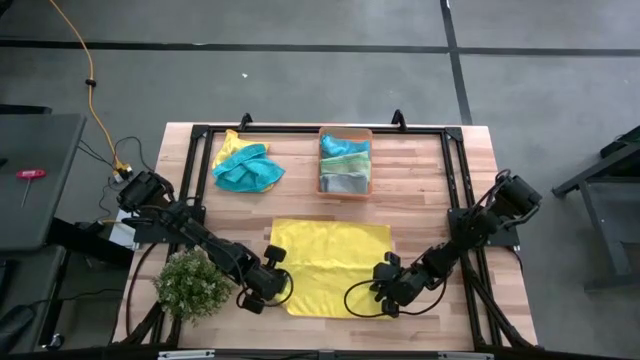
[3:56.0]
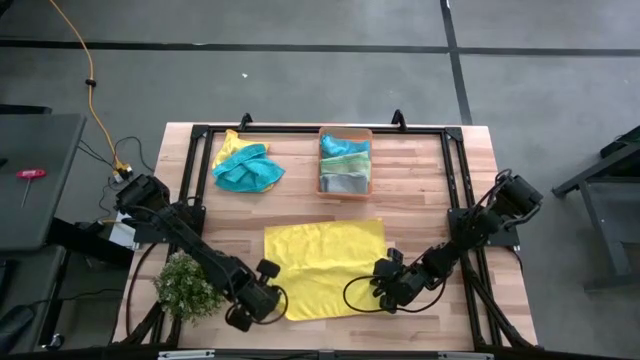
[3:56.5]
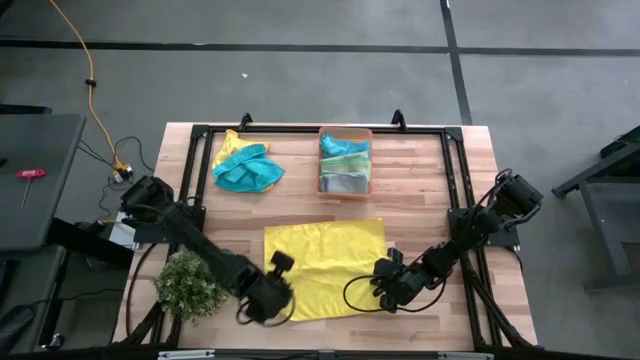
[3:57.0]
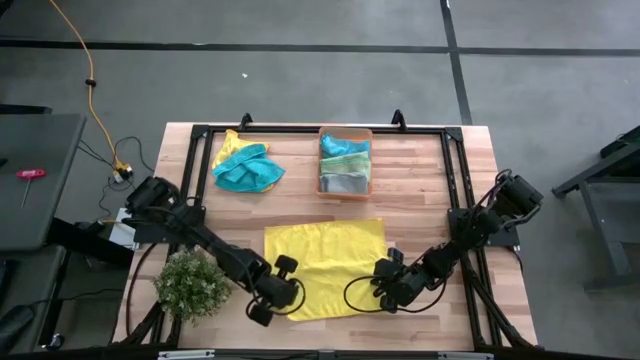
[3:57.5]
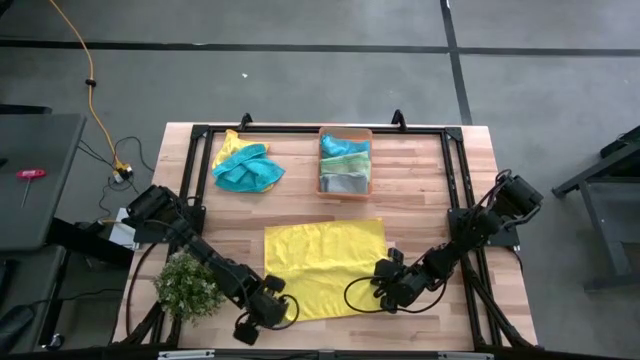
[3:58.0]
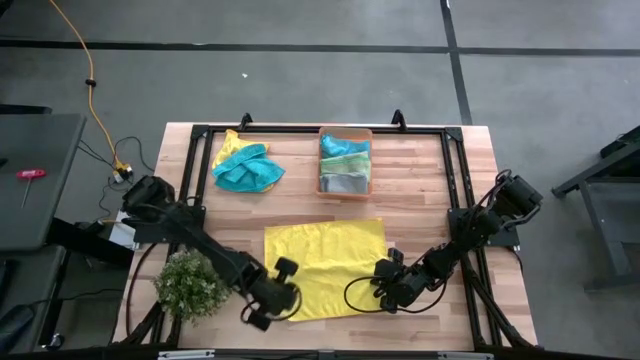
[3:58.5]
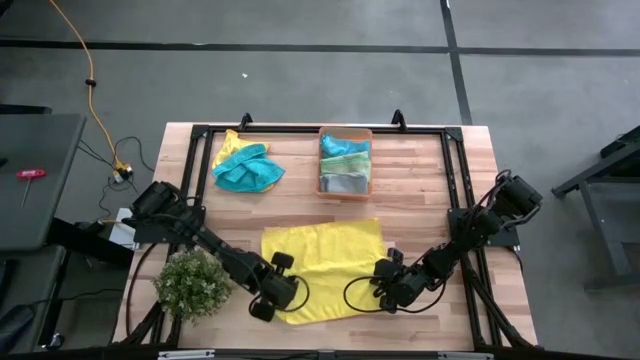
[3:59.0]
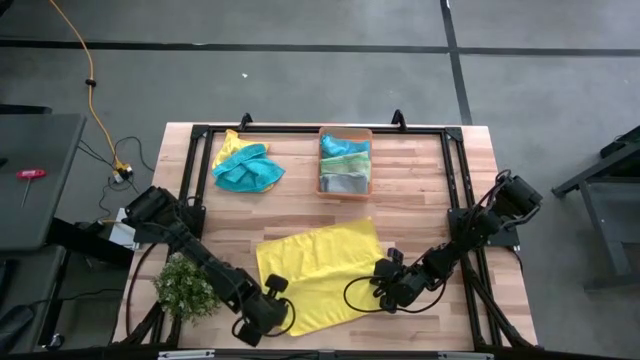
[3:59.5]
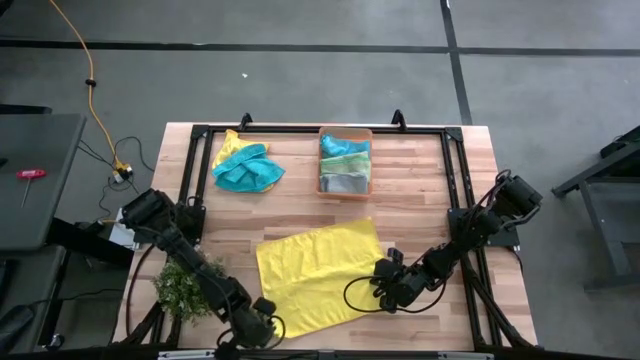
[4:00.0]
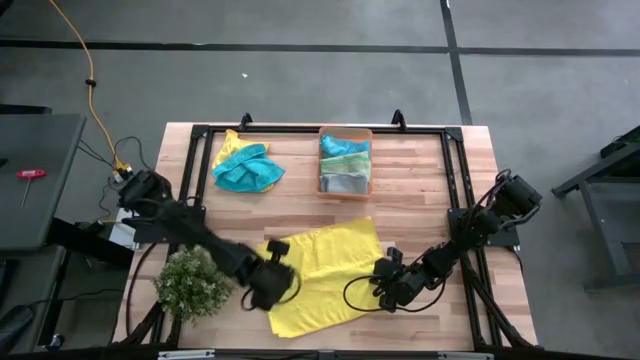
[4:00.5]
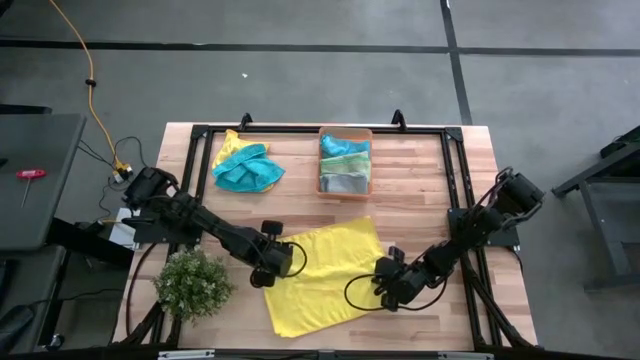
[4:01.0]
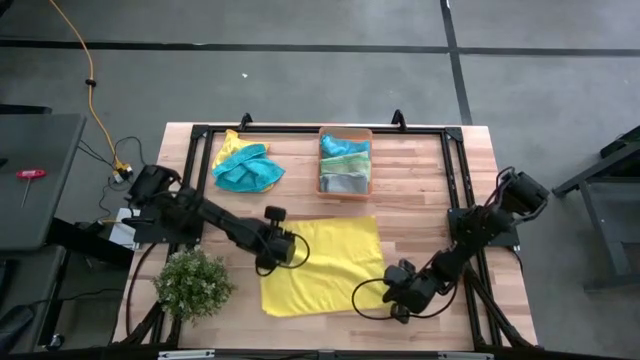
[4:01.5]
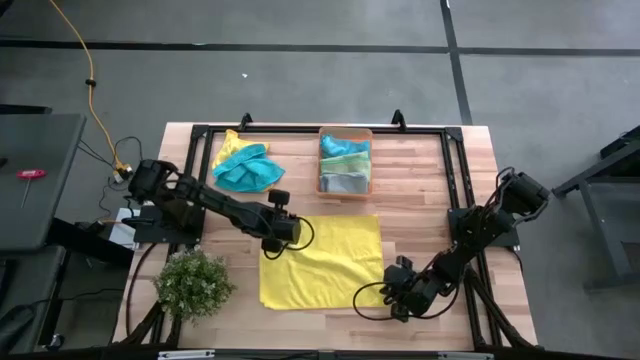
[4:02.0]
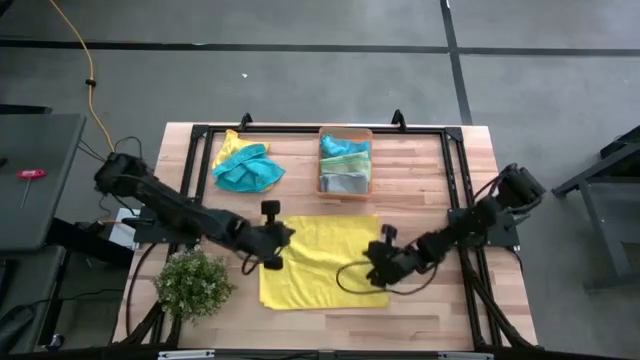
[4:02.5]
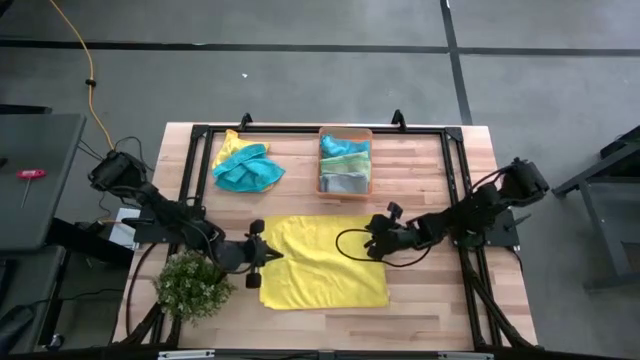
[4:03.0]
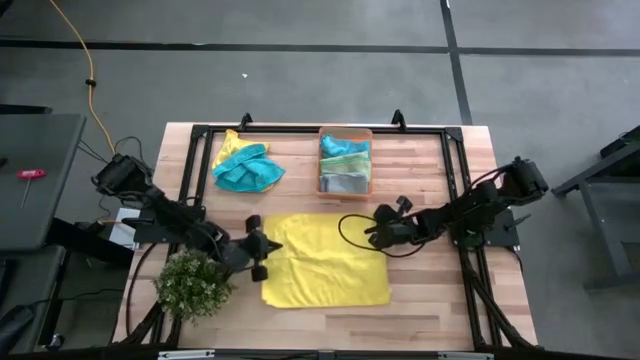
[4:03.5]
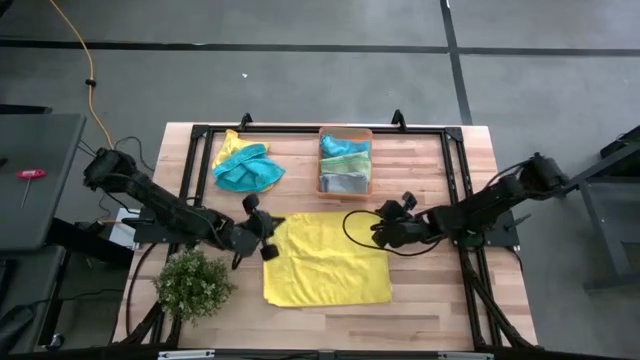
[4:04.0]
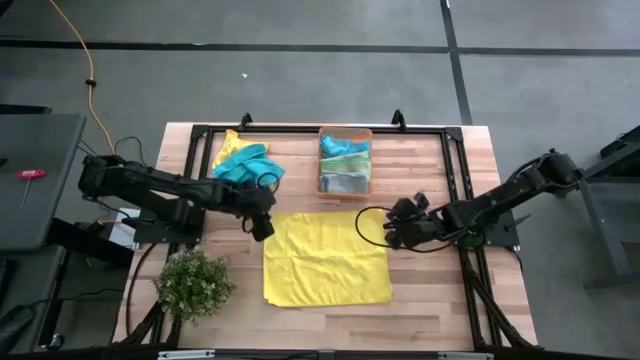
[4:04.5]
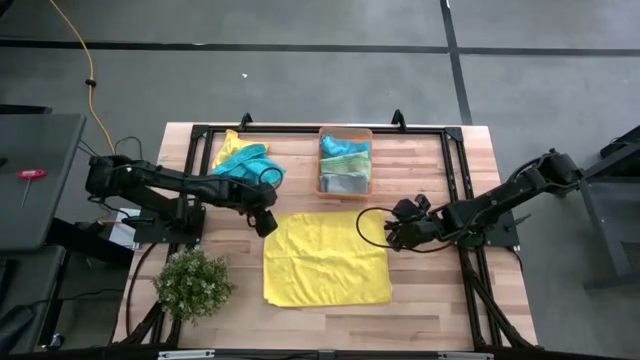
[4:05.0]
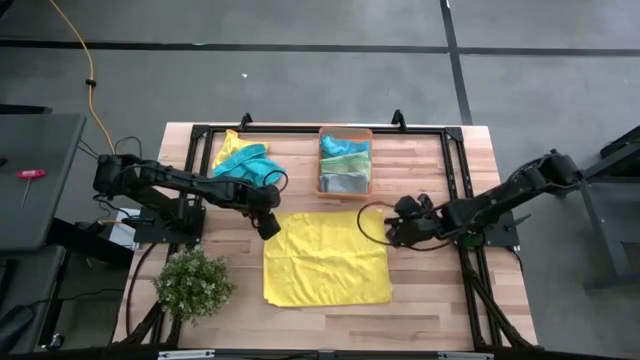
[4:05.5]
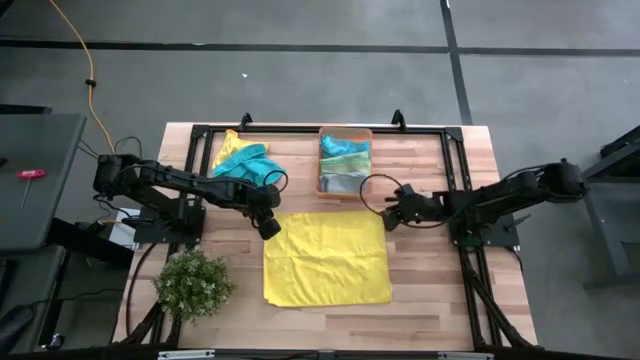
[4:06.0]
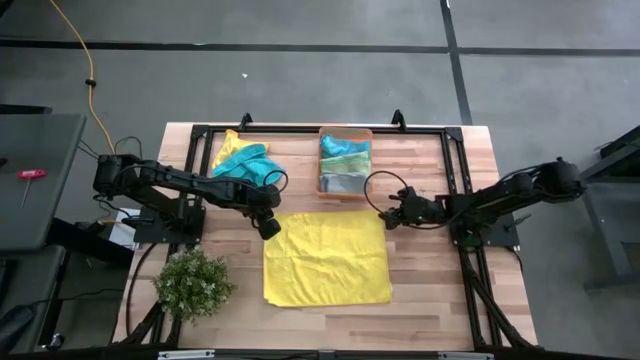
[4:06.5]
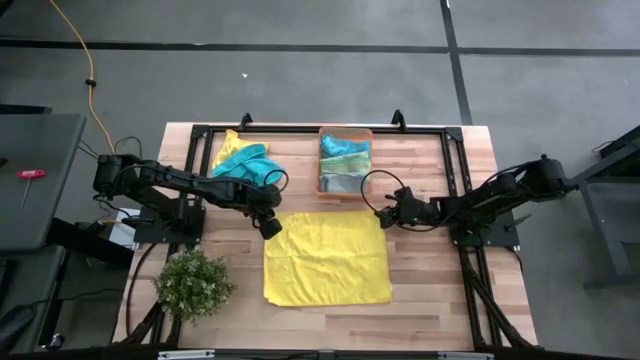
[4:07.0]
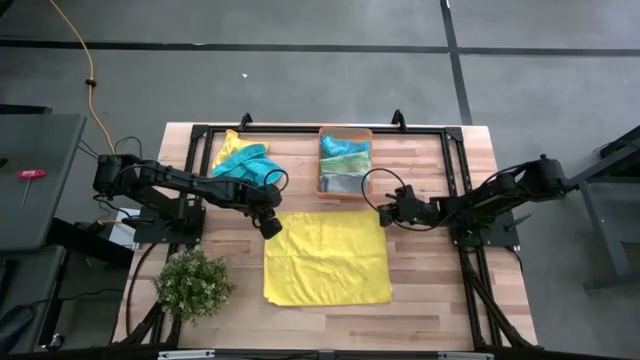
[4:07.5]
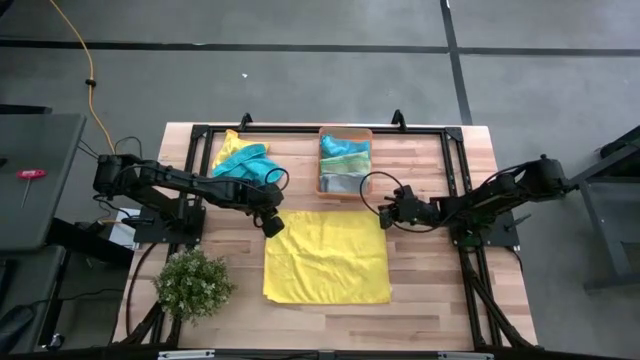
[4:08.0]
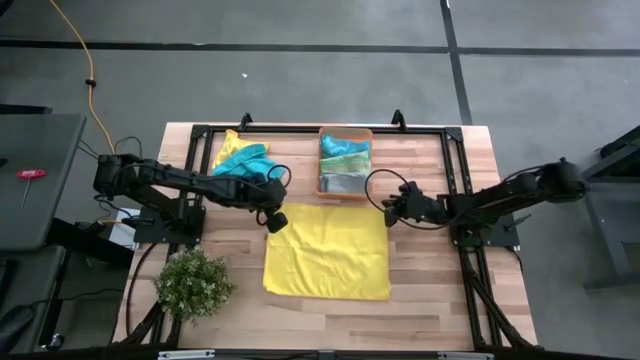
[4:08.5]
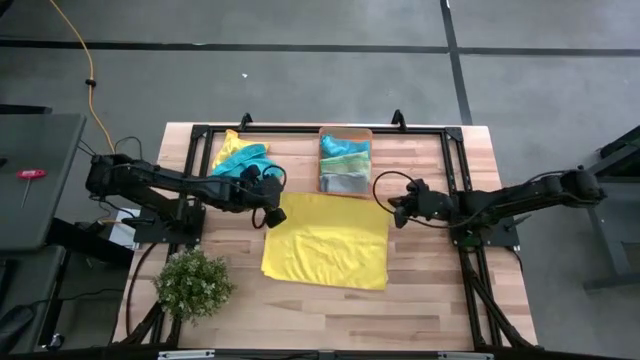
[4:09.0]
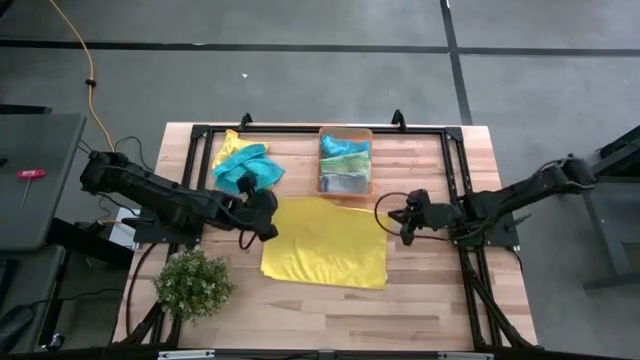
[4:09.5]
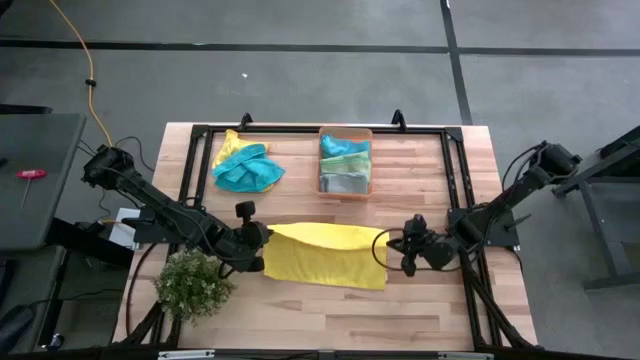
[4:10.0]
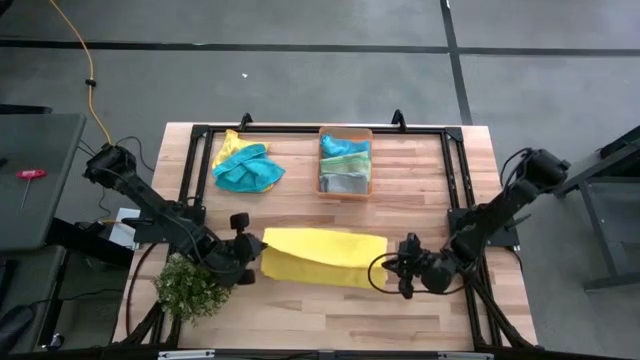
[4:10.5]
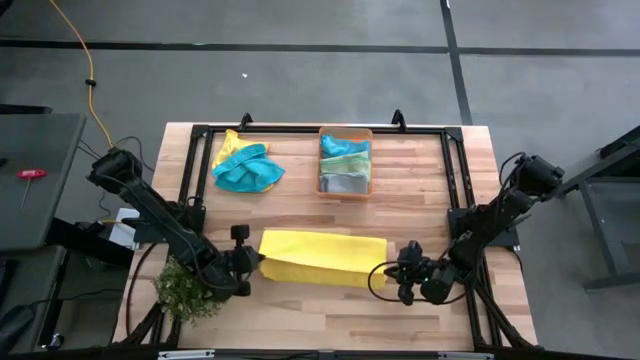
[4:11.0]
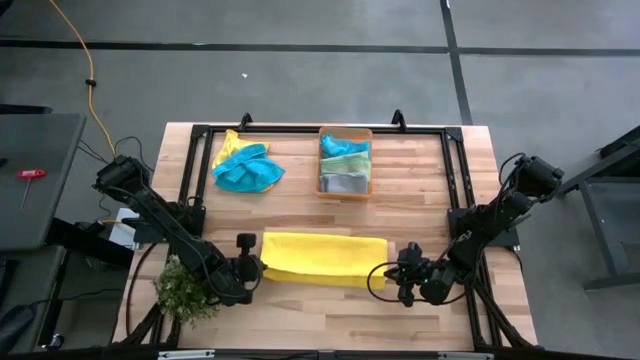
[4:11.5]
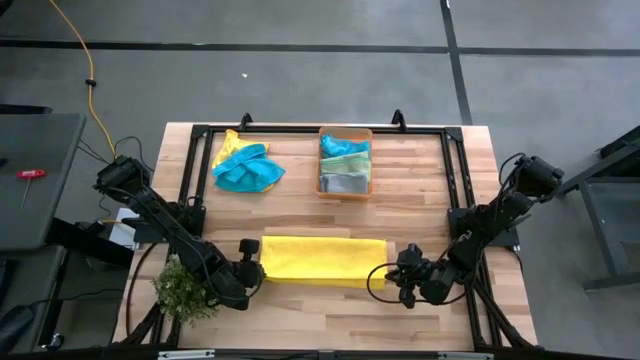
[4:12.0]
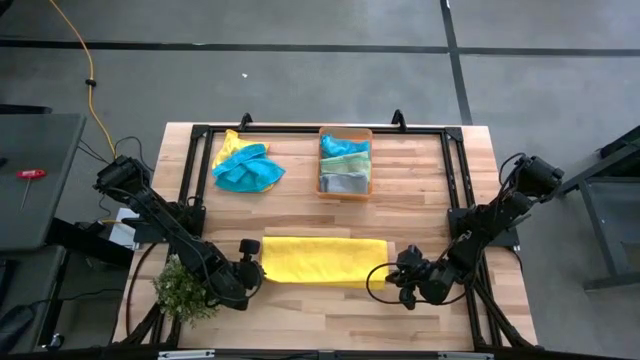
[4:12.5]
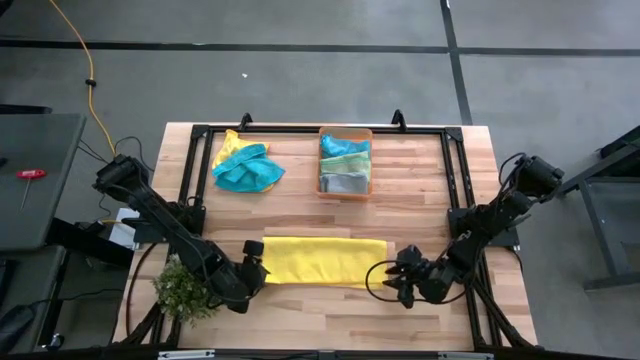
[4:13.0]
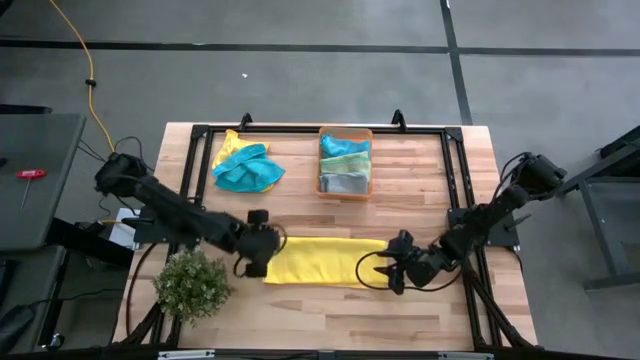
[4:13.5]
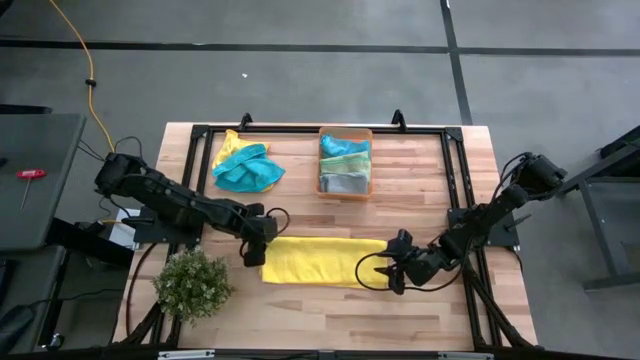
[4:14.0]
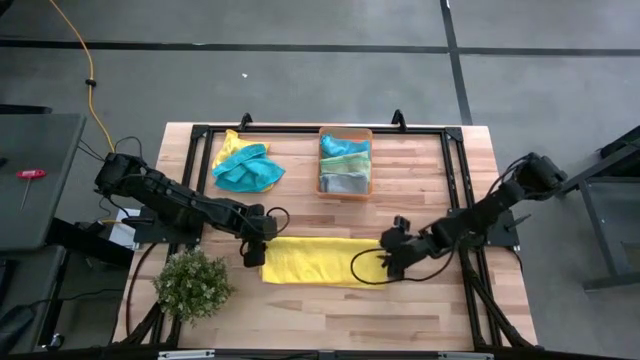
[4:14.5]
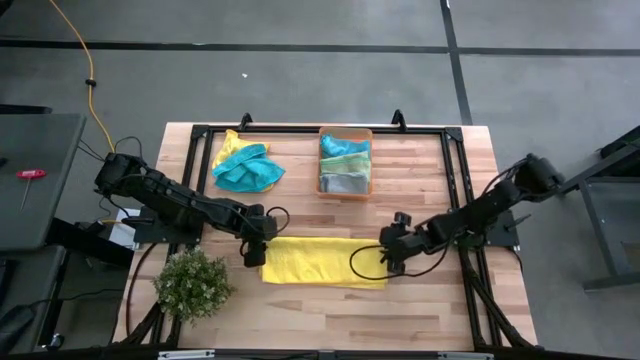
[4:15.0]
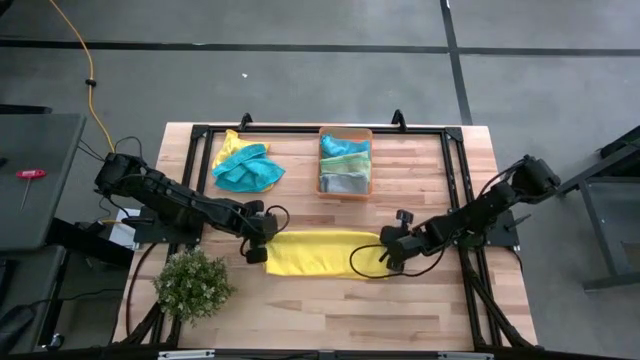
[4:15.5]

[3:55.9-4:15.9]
Task: Fold microfiber towels
Fold the right yellow microfiber cloth
